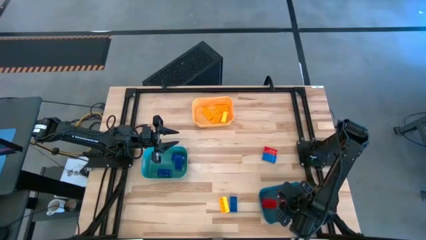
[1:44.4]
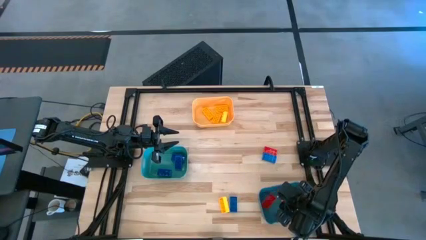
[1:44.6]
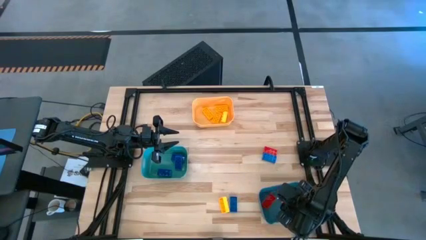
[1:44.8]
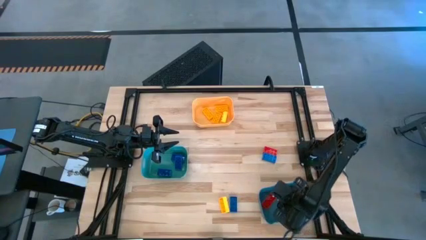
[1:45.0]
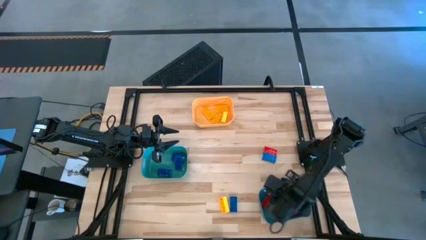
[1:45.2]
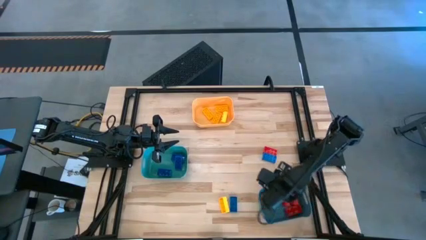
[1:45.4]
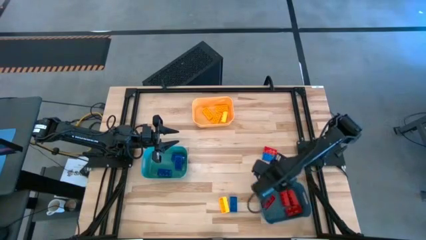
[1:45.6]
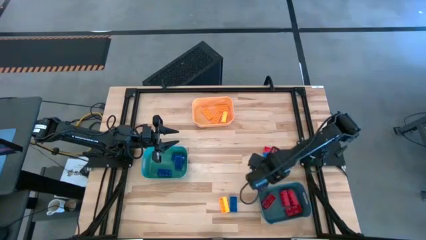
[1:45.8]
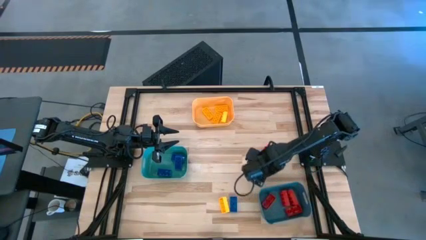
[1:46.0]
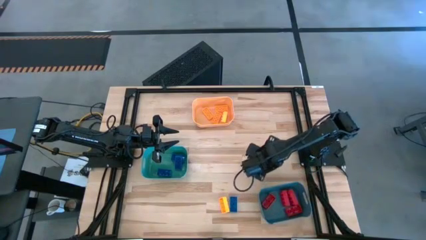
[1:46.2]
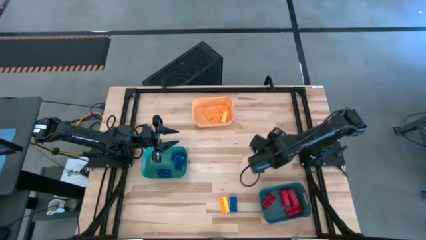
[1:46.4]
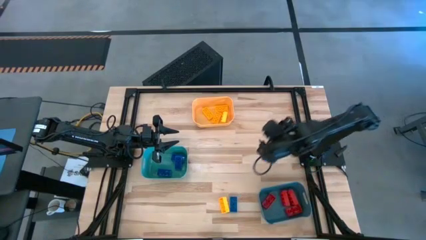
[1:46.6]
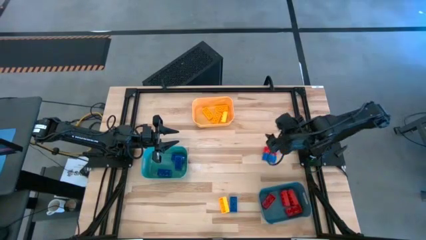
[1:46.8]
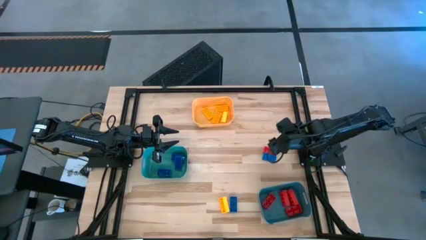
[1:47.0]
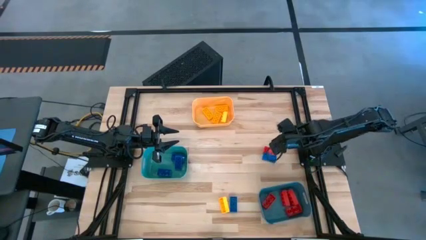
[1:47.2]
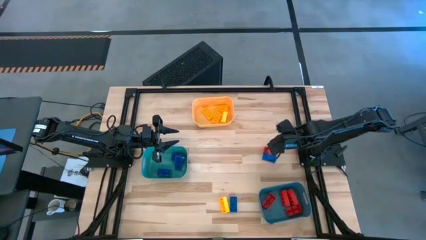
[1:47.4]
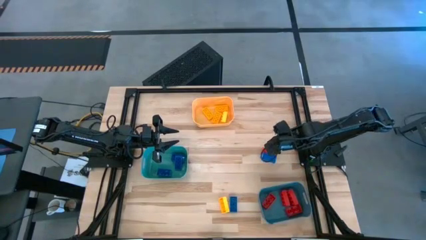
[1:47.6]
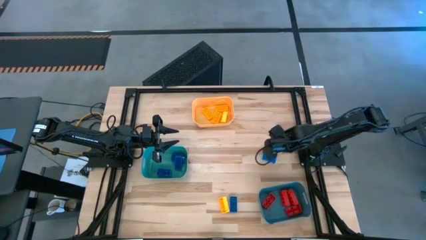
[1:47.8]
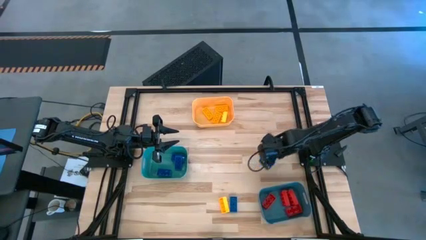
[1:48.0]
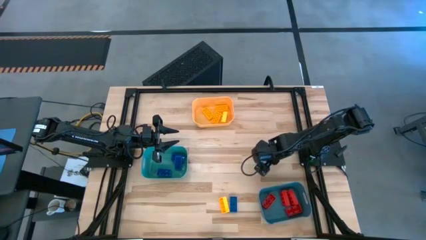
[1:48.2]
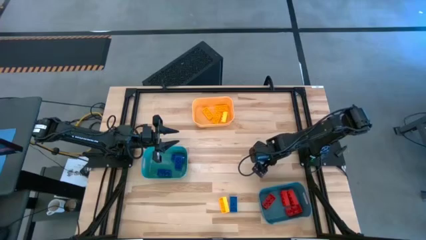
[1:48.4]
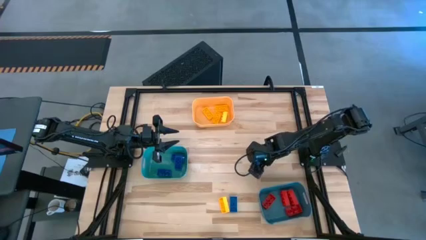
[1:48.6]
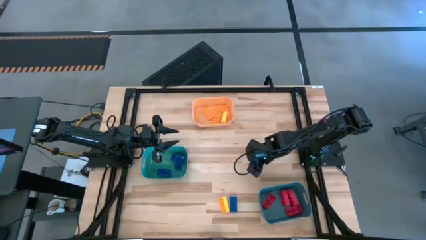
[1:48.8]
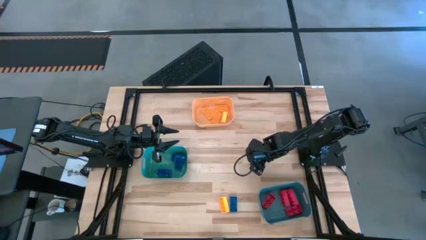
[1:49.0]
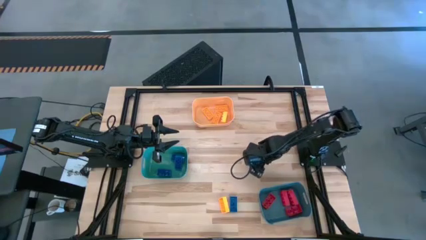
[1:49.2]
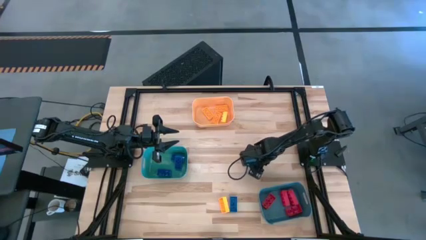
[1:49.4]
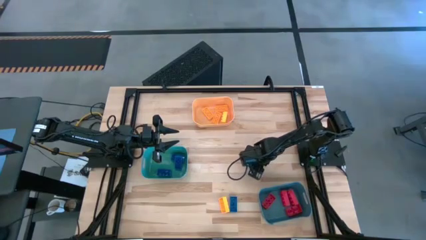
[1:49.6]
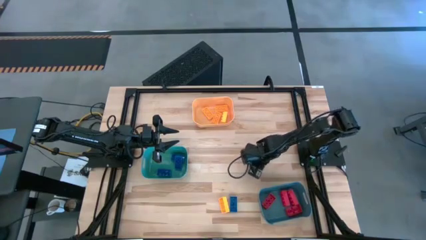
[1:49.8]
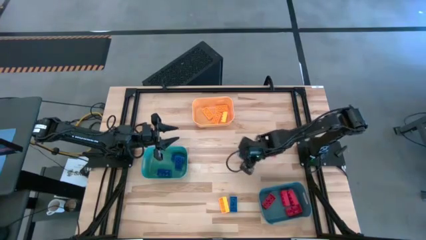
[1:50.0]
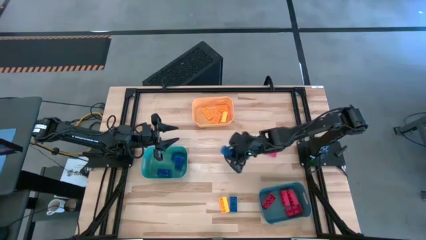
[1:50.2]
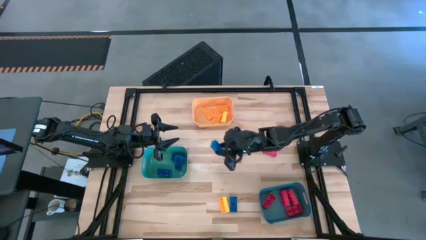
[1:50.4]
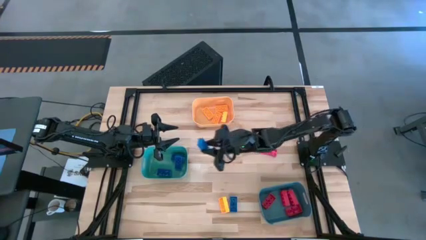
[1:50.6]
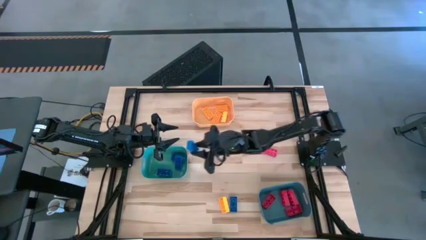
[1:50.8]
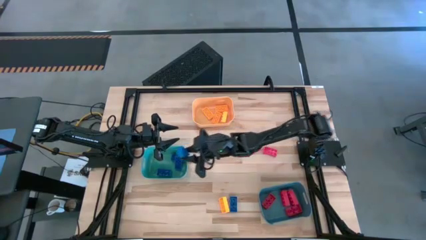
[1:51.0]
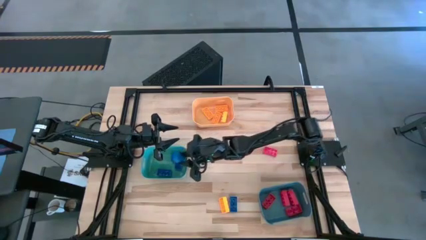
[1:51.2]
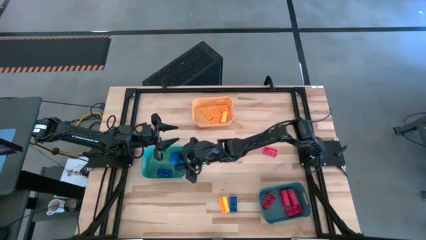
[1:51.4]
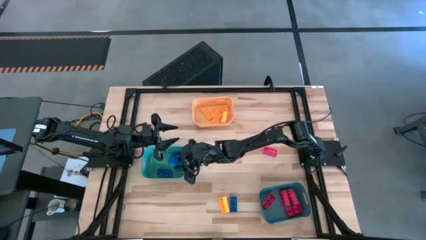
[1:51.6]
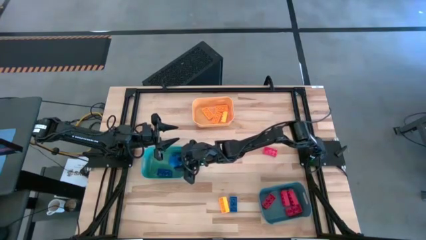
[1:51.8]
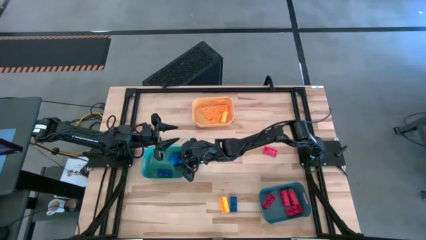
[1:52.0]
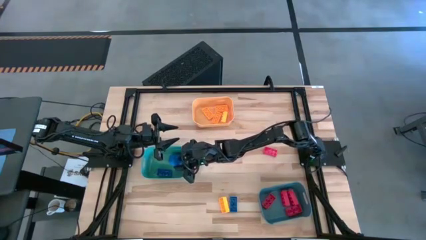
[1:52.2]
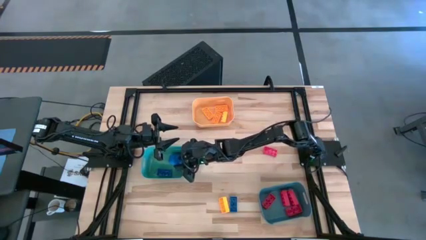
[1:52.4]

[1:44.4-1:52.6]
Task: Sort & place blocks by color
Put the blue game piece into the green bin

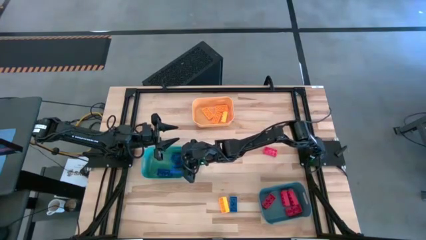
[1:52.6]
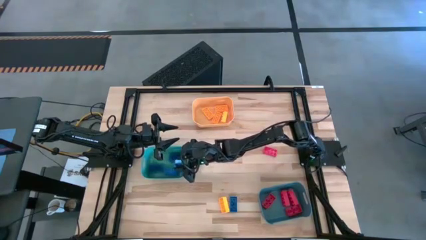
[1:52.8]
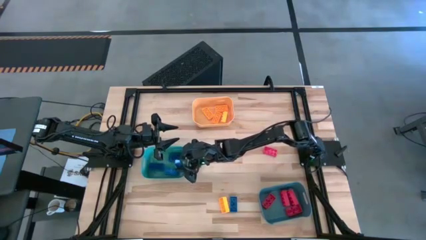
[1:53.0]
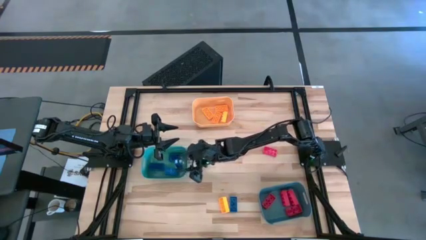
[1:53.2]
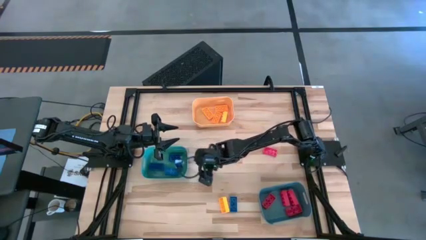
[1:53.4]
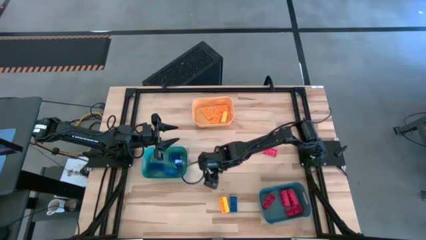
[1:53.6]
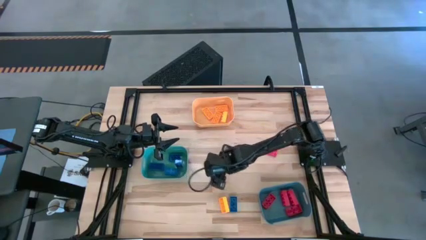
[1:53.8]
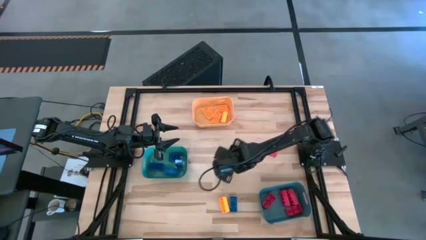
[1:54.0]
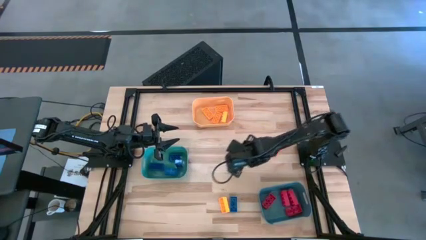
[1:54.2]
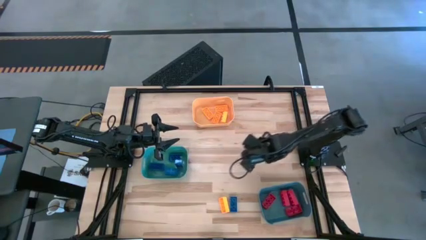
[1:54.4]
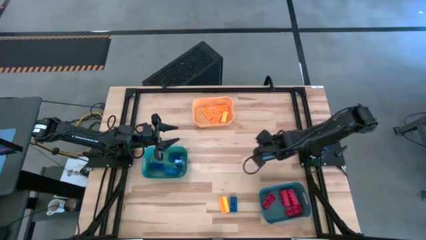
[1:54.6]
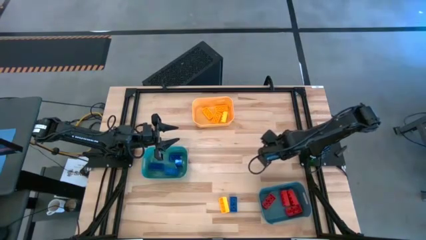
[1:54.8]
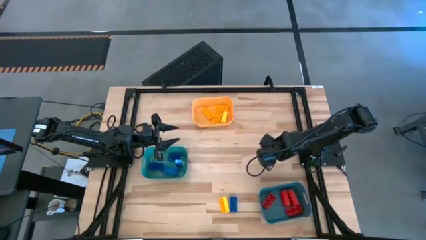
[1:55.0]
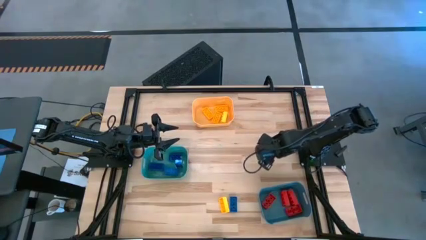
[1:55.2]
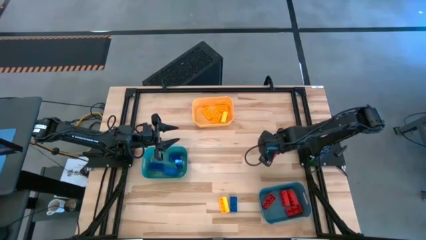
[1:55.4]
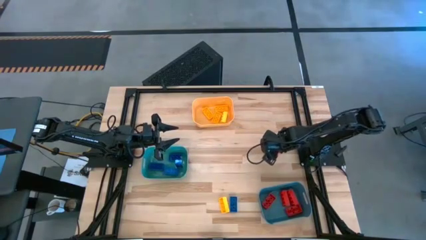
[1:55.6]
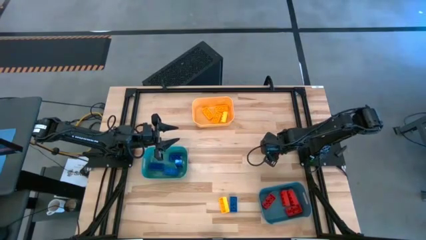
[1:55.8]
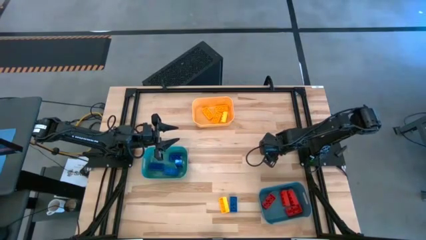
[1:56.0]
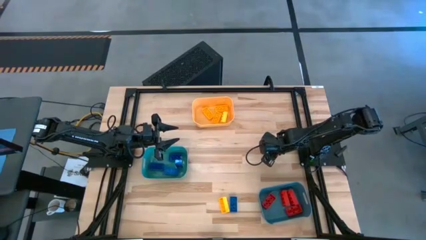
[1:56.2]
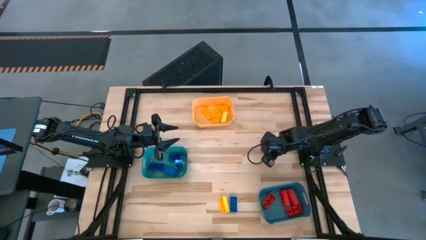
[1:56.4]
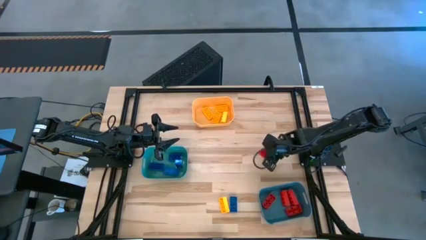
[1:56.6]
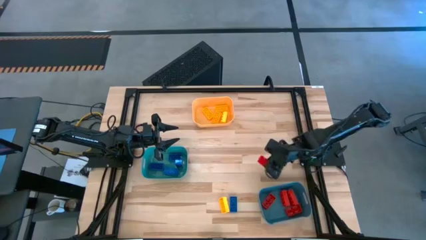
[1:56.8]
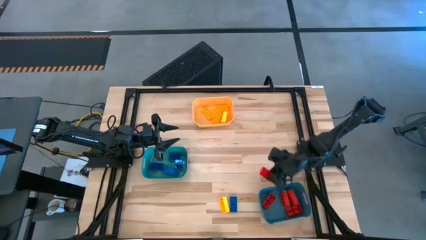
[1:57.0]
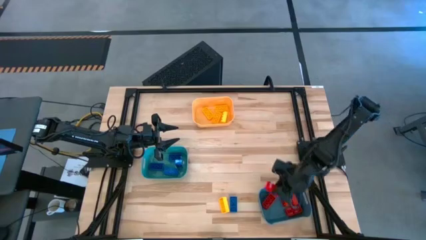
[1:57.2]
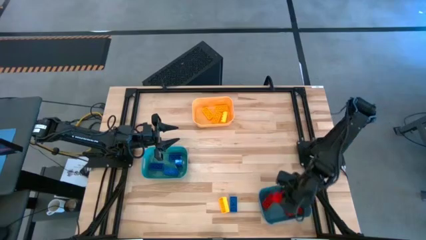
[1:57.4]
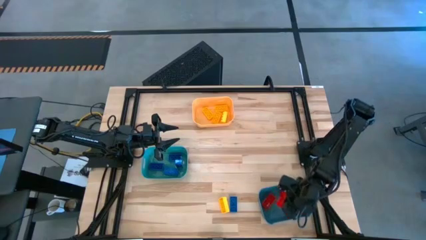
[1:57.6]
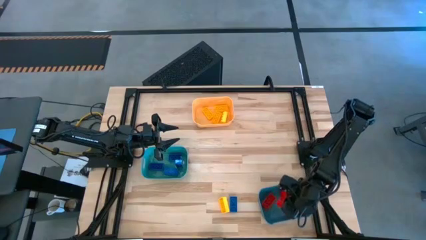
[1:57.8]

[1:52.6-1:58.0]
Put the red game piece into the blue bin

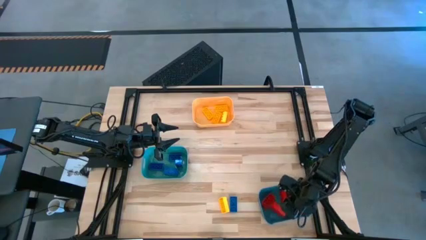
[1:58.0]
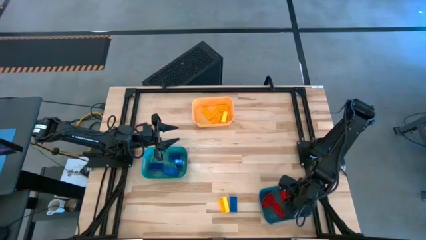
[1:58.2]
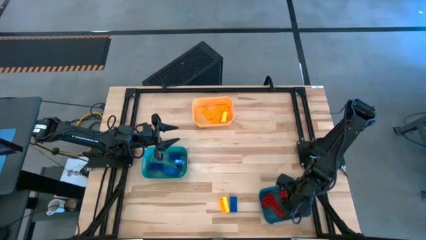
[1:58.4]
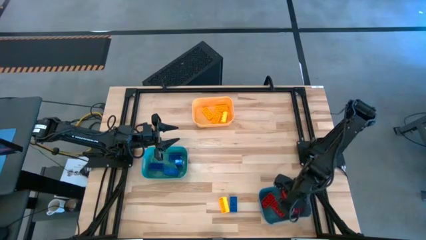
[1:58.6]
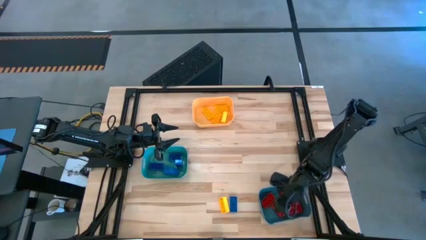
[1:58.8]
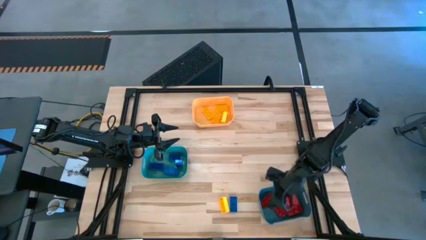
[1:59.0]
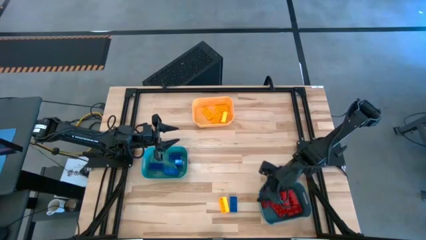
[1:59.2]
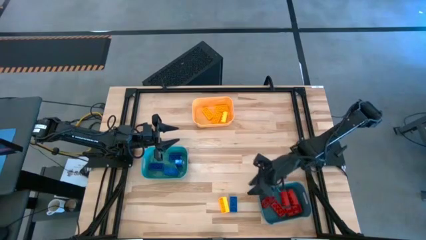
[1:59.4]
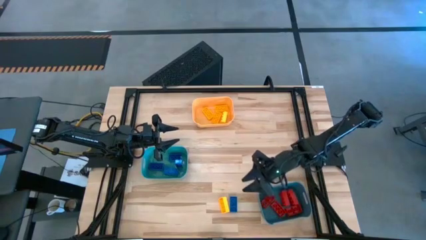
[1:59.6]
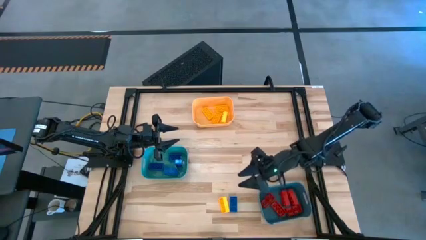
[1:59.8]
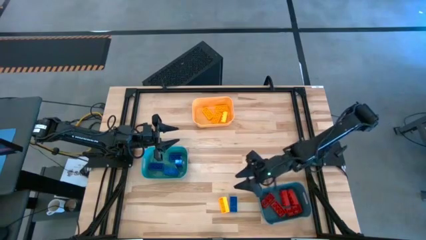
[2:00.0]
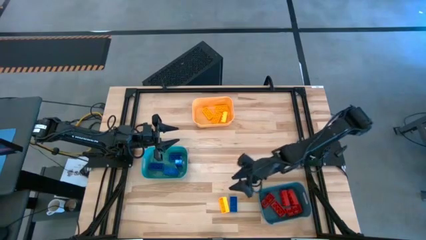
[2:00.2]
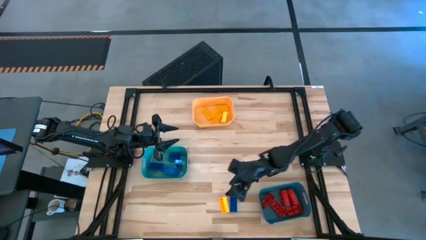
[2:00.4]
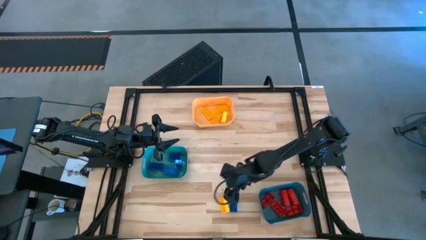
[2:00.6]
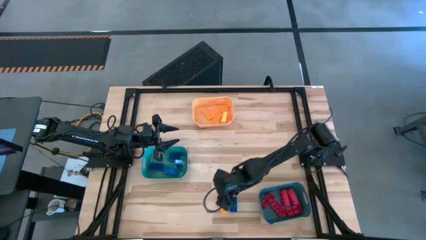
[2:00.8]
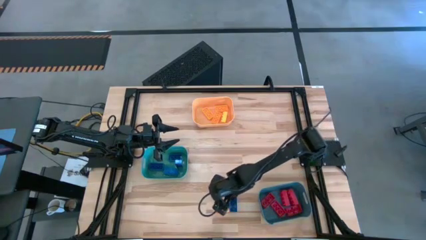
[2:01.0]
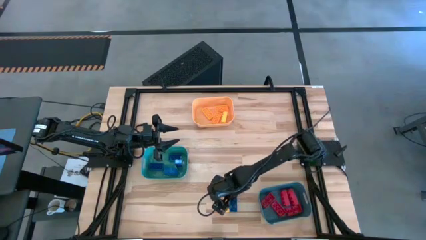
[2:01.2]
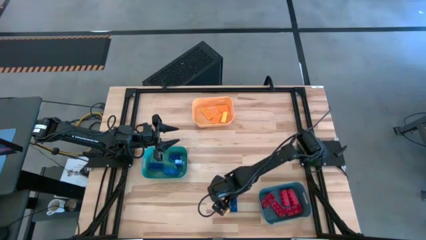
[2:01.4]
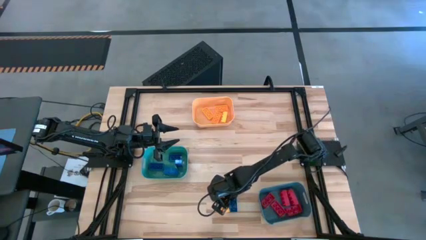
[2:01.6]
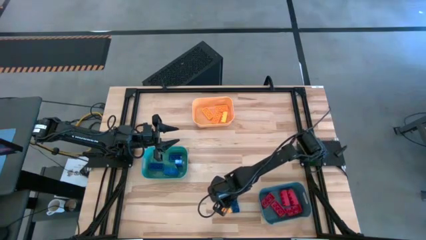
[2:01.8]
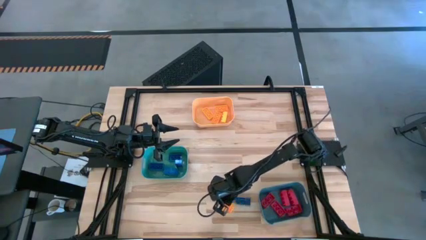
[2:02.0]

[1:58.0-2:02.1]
Put the yellow game piece into the orange bin
